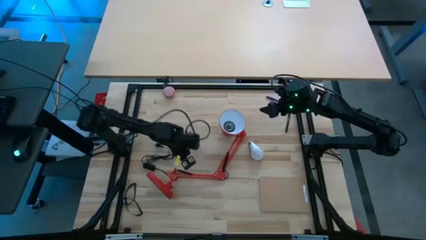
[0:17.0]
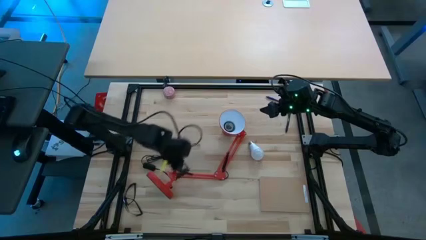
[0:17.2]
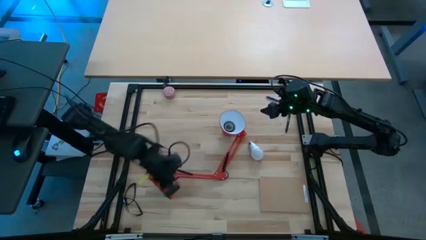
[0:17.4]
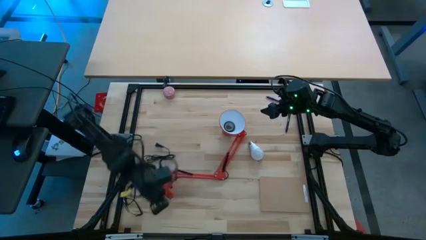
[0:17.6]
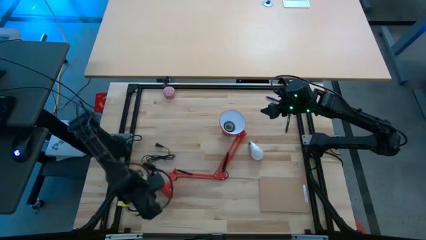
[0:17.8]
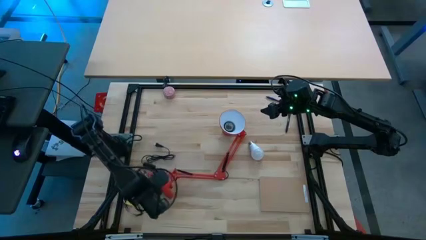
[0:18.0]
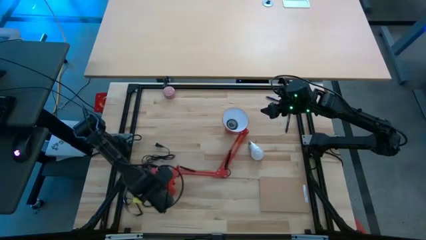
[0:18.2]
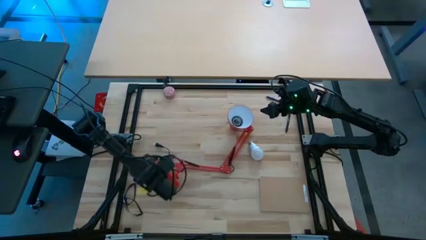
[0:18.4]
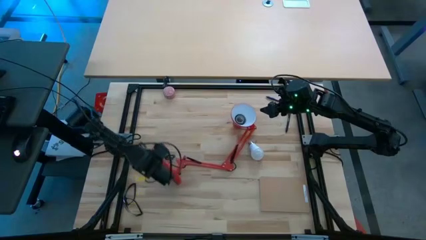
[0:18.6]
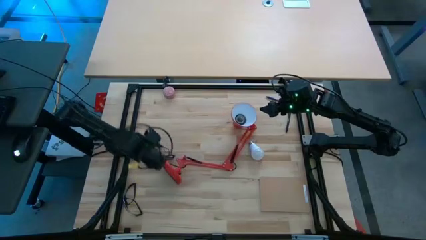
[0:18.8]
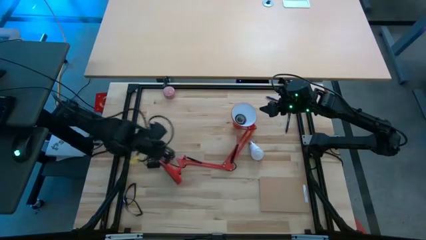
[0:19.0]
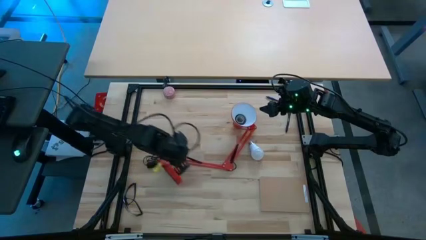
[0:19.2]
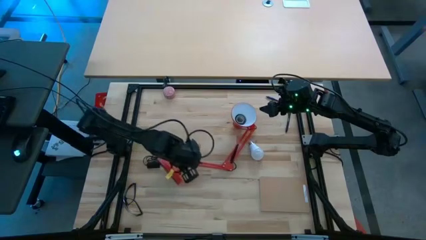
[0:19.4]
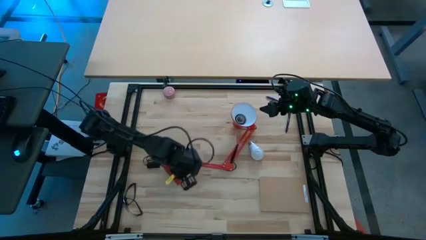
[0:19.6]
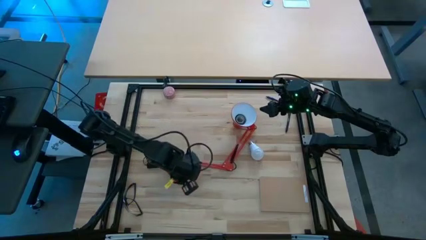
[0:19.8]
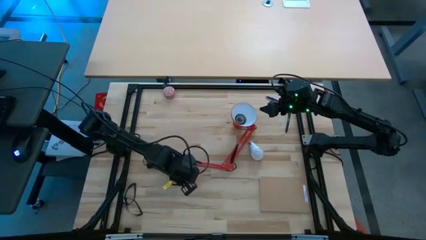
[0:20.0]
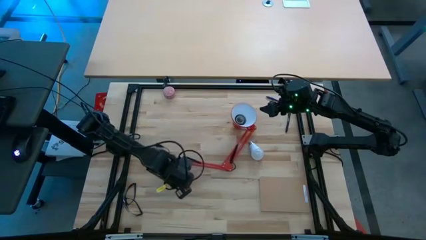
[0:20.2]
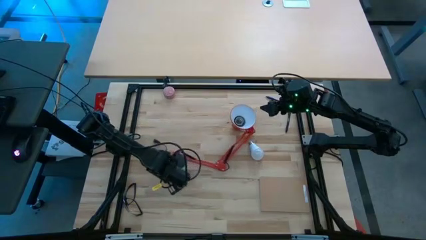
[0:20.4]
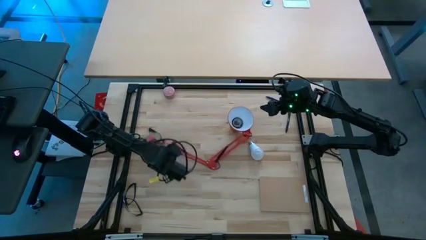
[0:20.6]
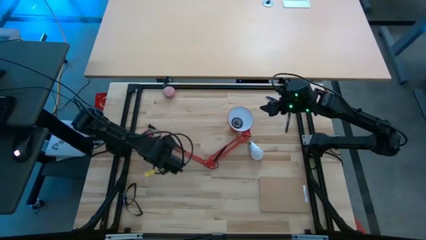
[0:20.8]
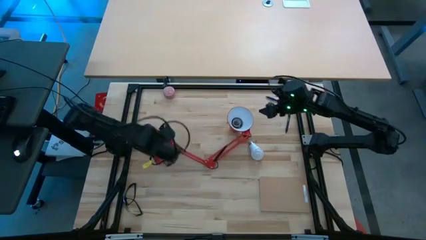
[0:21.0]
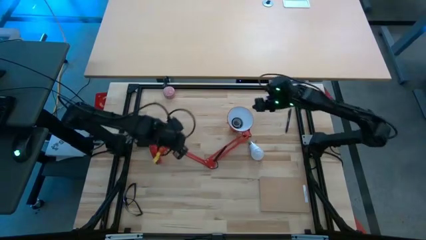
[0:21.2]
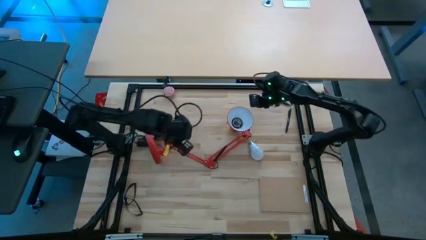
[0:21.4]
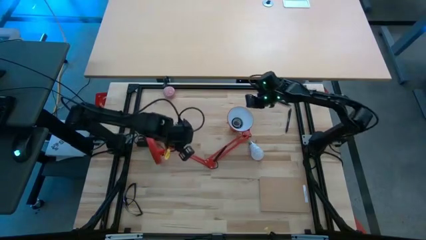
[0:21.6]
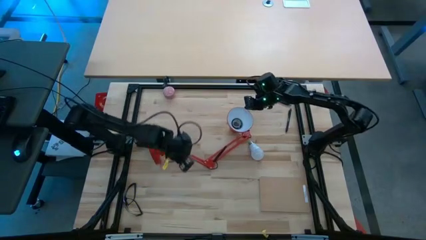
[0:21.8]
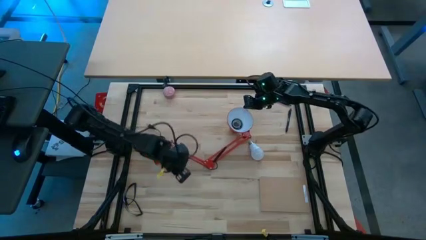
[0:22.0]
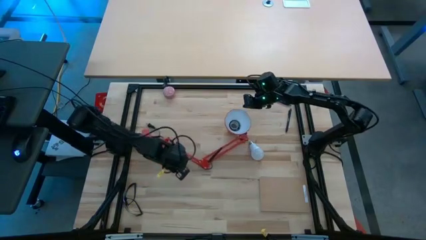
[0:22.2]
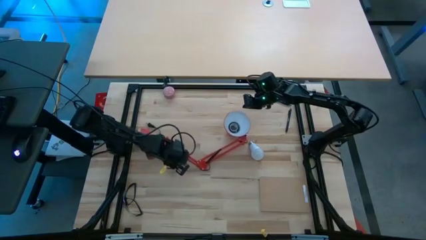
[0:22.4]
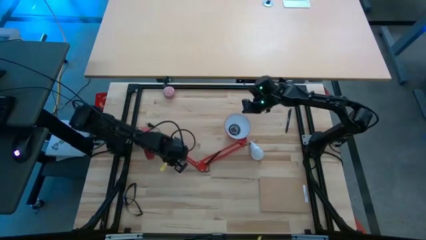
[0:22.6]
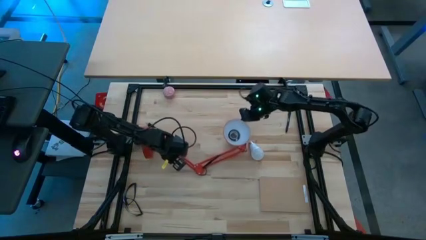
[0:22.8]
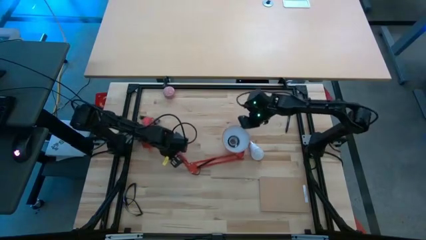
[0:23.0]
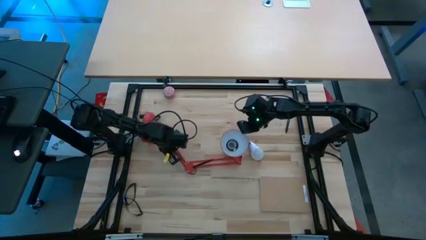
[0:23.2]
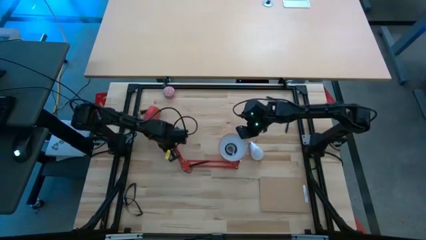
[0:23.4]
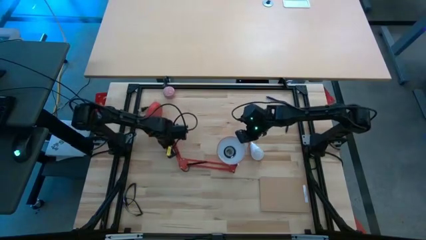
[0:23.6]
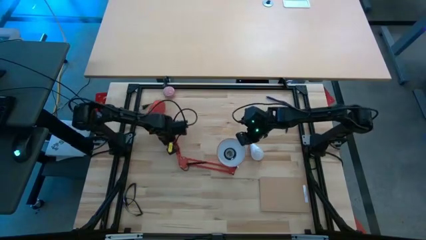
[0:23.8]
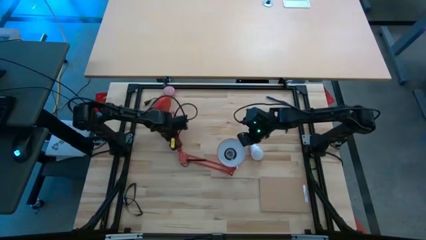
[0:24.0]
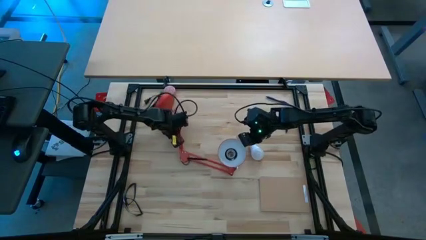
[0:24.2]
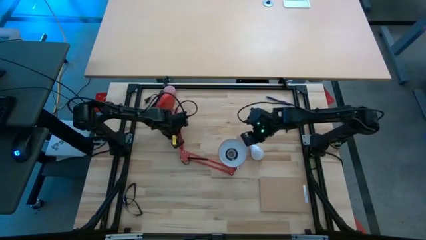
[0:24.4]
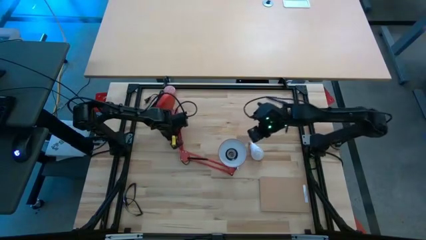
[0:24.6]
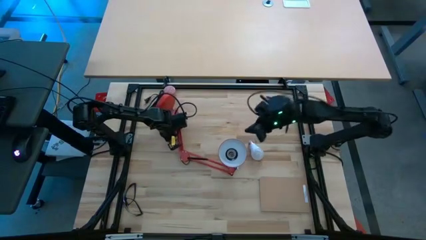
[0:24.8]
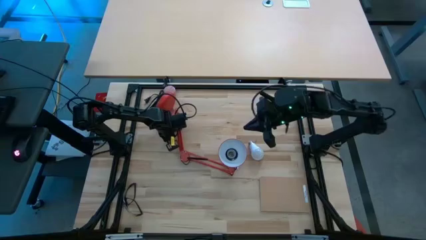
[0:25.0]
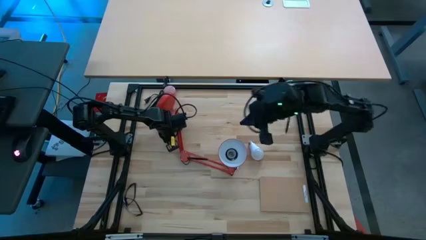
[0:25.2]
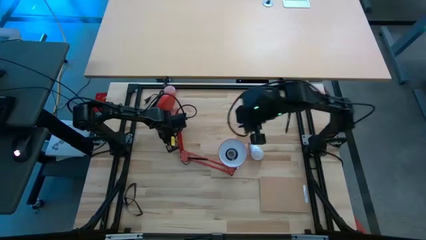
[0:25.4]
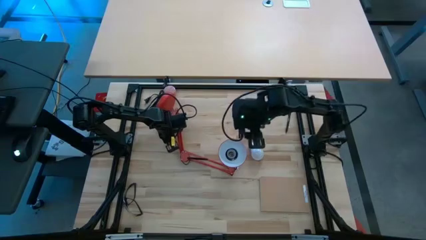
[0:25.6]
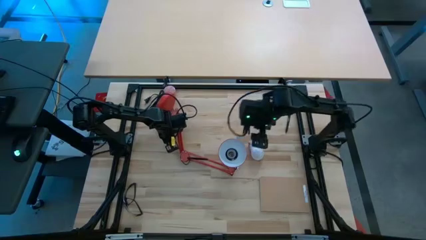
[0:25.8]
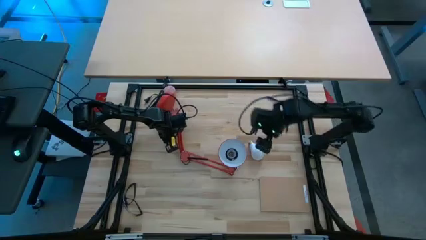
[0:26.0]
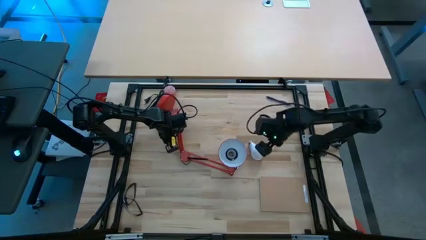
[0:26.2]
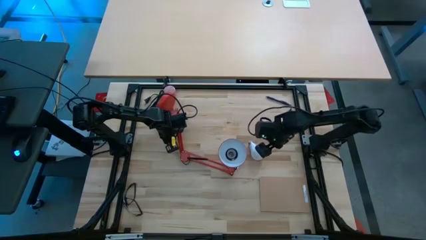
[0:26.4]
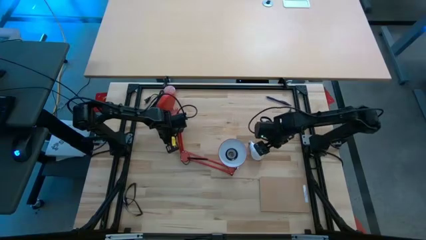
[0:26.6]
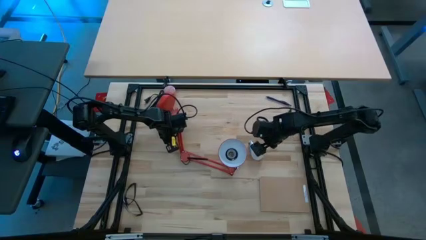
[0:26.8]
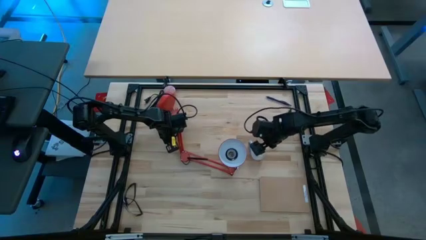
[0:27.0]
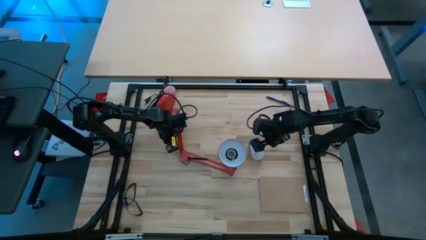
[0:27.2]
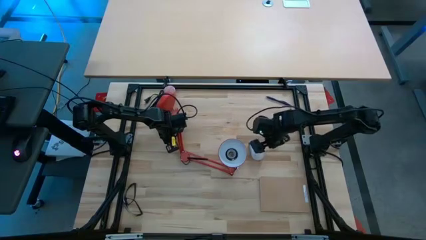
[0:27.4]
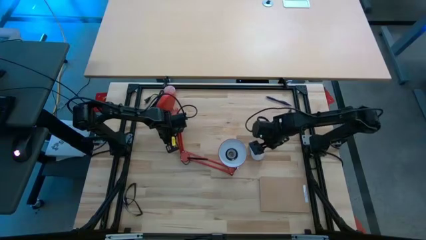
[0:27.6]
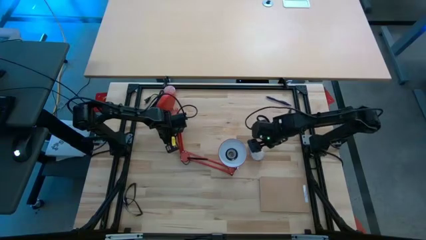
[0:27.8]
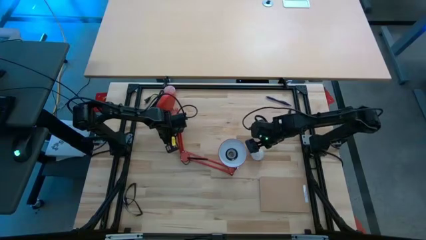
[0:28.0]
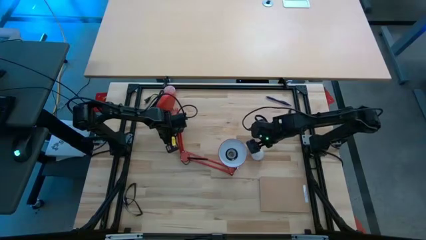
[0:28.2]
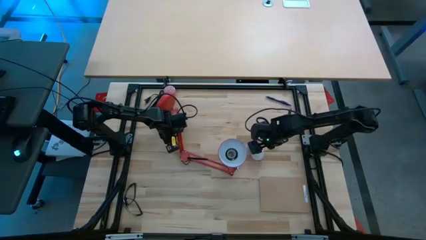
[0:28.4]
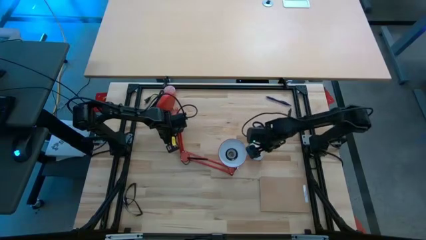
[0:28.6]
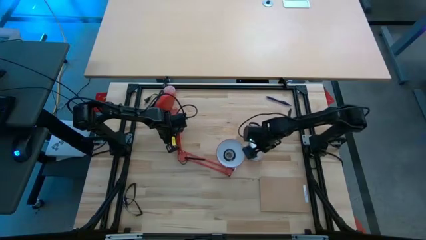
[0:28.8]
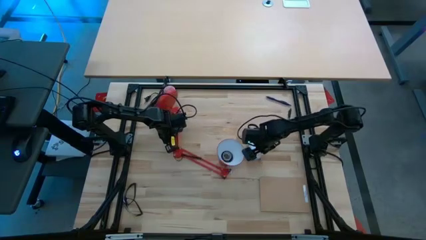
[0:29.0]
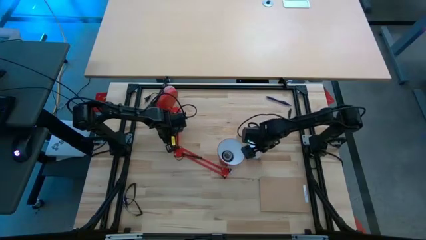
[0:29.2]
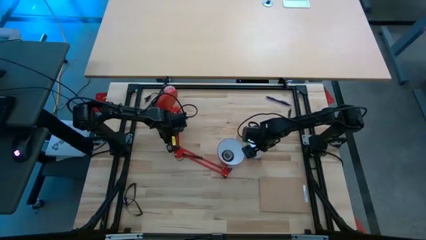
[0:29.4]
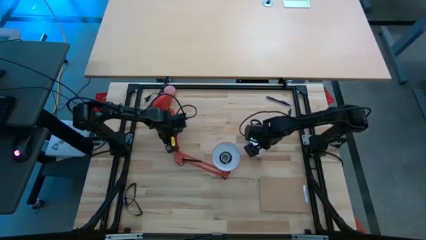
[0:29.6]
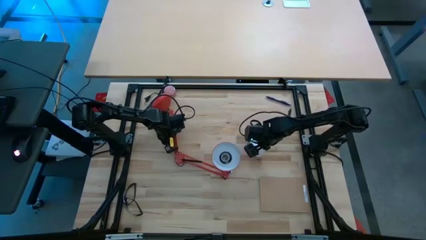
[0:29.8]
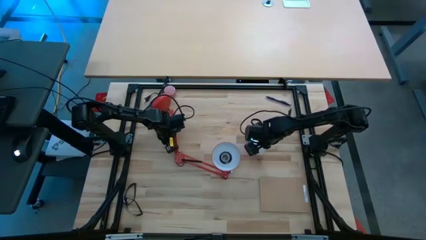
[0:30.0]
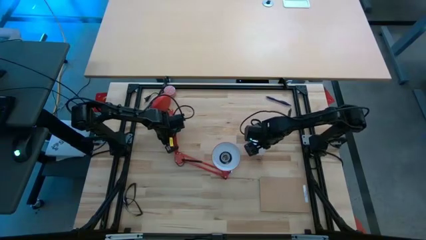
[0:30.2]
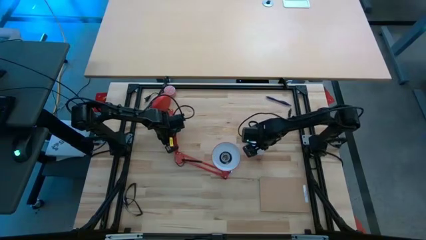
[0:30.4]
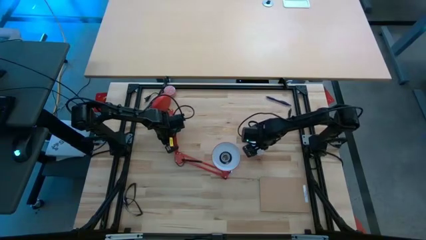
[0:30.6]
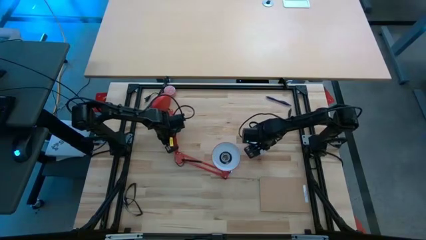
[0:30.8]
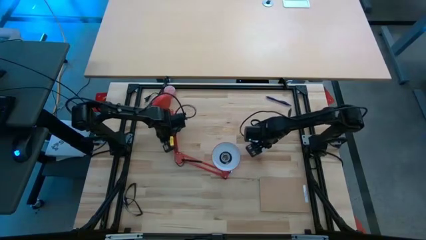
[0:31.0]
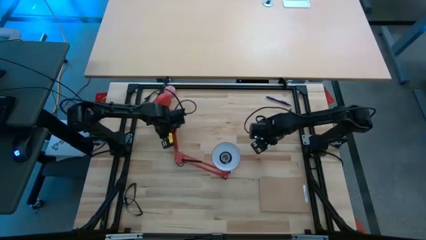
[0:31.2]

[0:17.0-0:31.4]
Task: Screw lightbulb
Prepare the desk lamp
